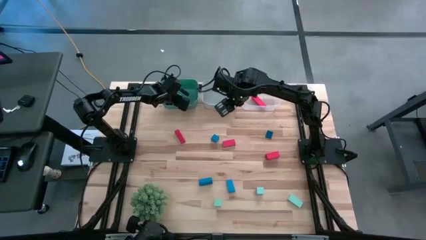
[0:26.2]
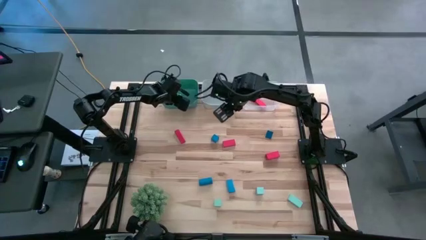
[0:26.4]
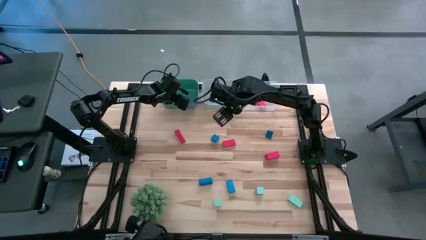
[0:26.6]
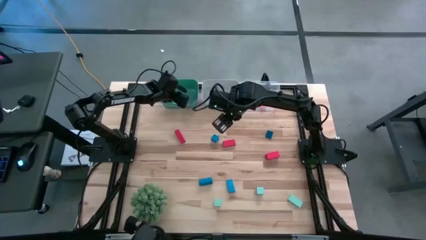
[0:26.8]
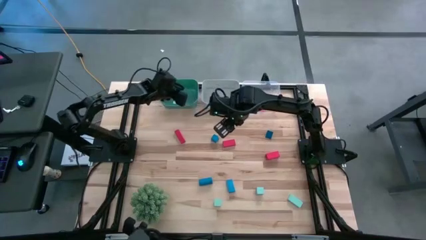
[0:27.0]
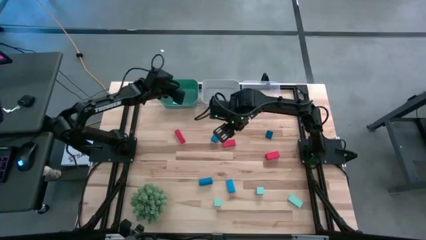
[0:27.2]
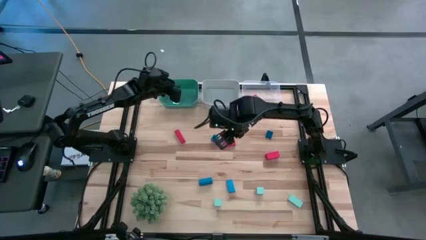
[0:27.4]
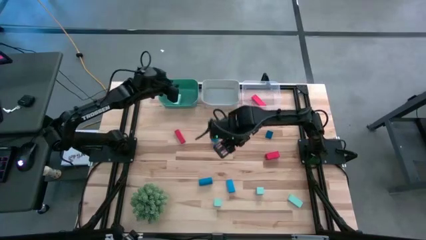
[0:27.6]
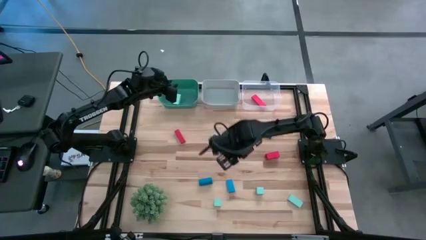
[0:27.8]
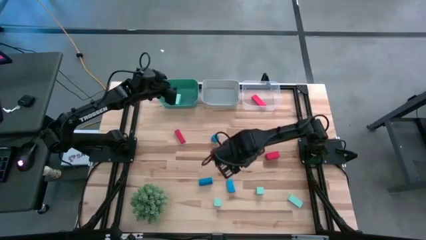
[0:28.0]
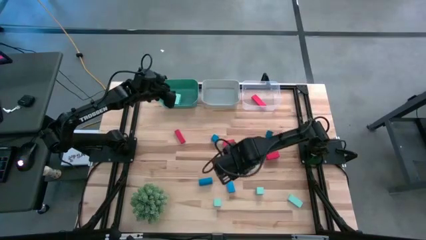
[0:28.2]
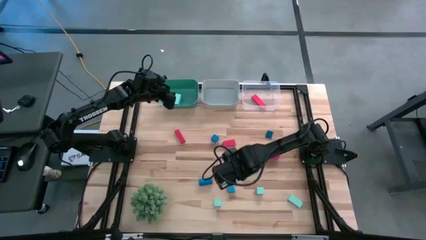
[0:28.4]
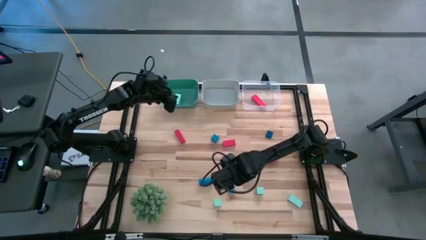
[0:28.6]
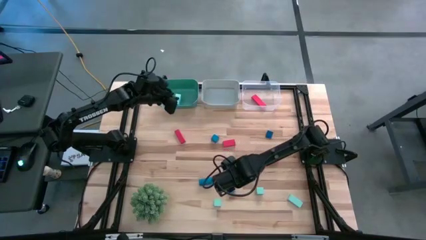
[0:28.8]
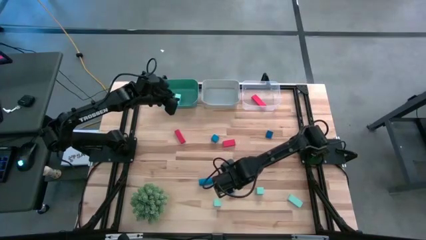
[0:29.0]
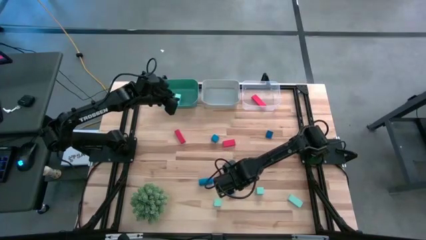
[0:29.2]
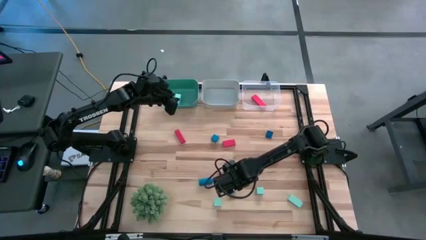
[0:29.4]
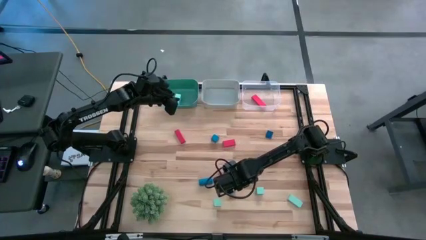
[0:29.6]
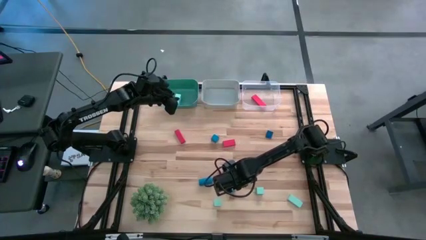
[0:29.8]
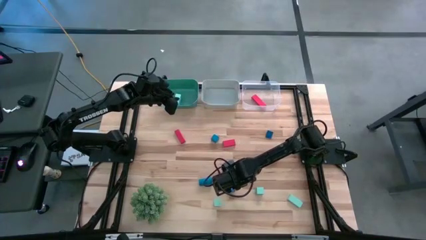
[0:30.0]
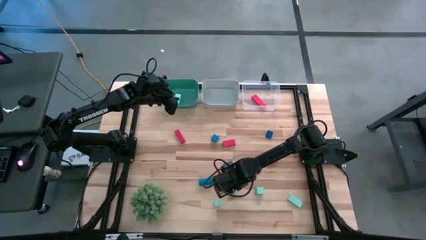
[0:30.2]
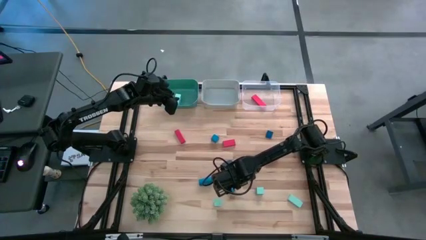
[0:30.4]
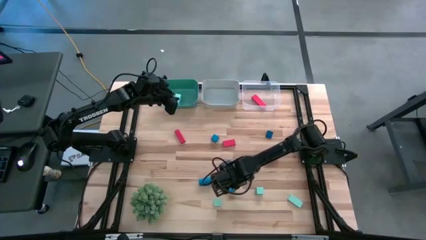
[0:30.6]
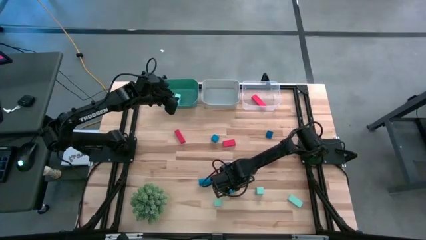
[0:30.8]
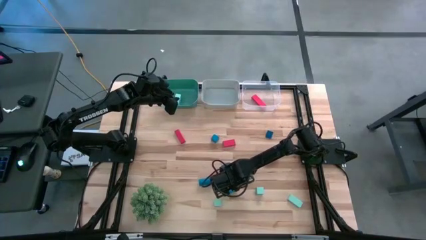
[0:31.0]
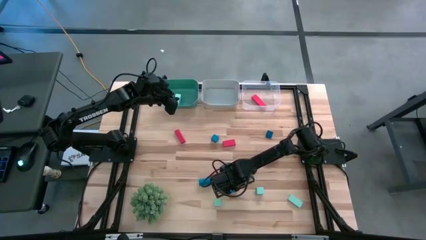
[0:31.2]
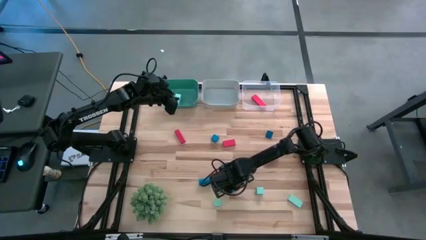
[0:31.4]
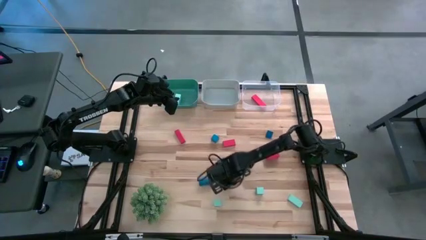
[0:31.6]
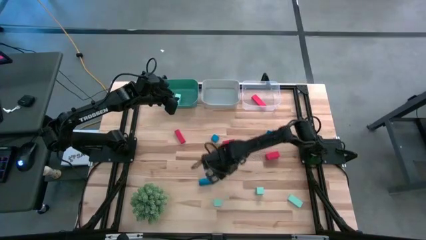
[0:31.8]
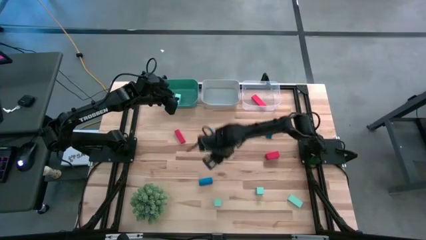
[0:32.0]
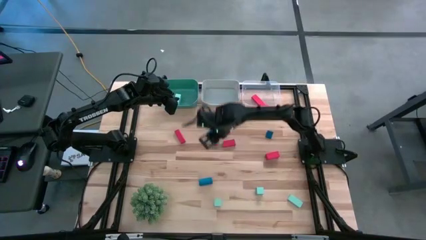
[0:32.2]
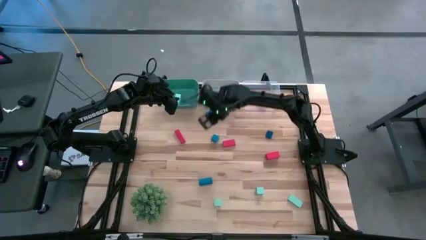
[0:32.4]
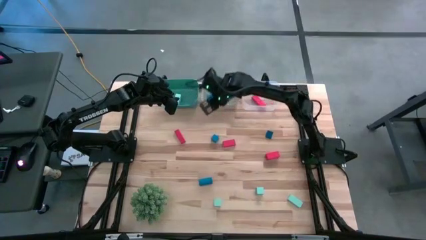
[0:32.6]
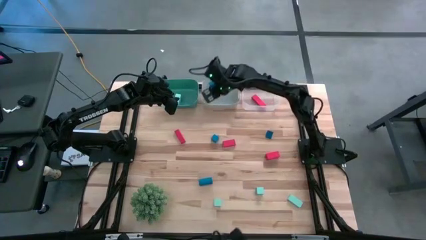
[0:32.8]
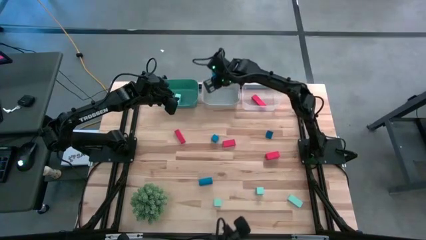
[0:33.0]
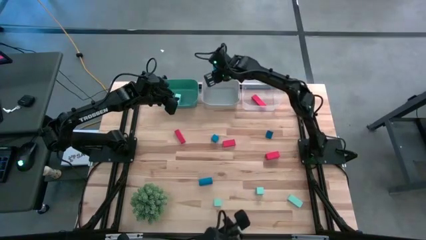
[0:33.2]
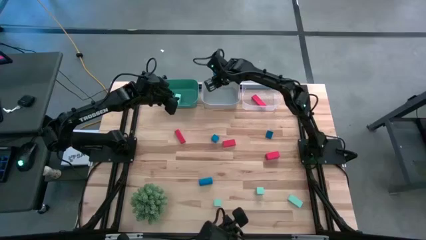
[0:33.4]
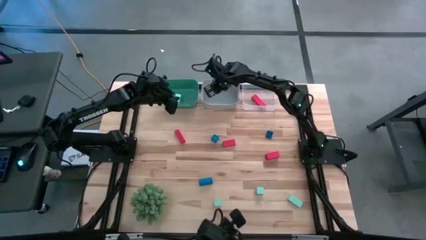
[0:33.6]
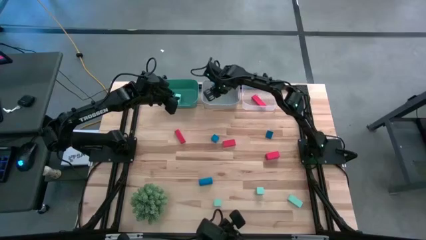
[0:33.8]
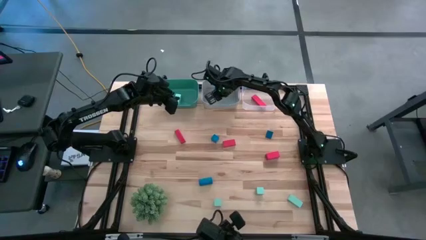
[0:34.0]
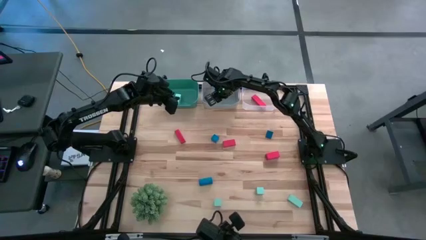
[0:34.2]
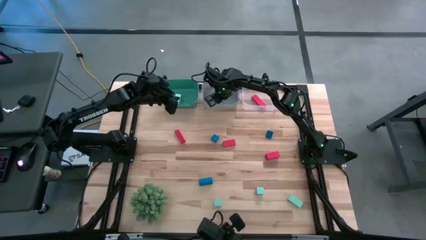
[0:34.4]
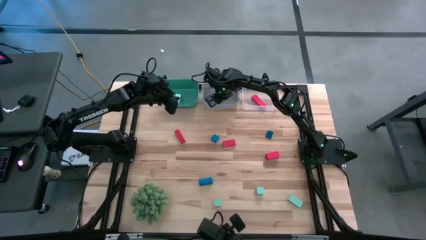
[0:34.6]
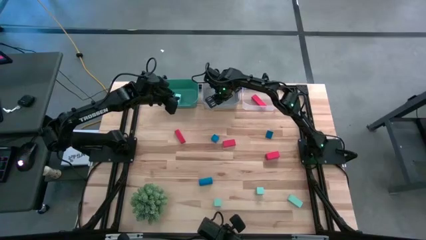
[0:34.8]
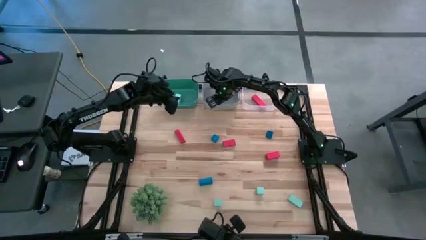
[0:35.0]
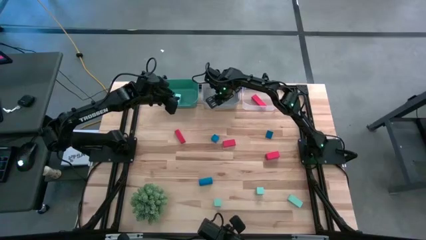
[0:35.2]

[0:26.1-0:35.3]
Task: Sort & place blocks by color
Put the blue block into the gray bin

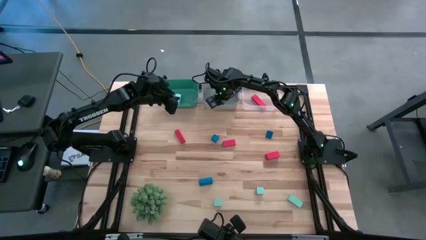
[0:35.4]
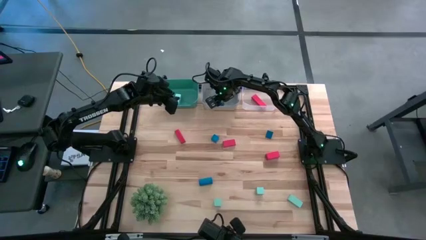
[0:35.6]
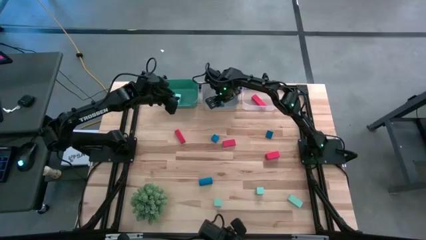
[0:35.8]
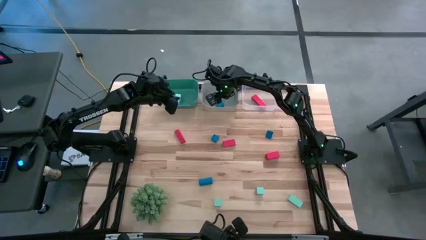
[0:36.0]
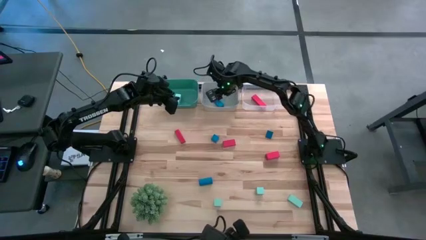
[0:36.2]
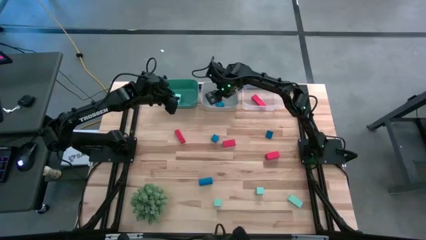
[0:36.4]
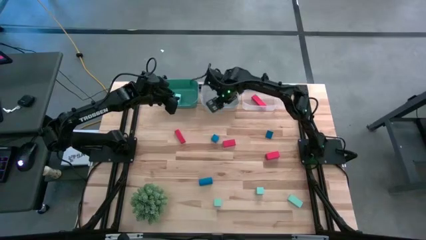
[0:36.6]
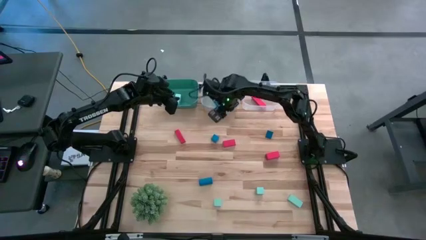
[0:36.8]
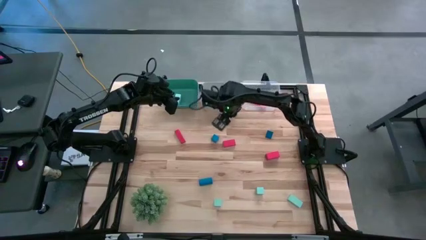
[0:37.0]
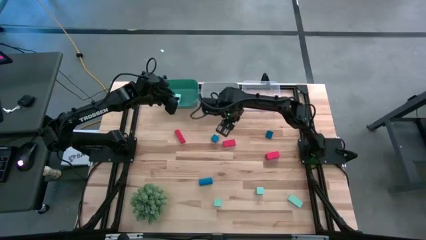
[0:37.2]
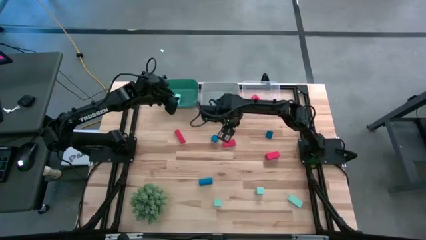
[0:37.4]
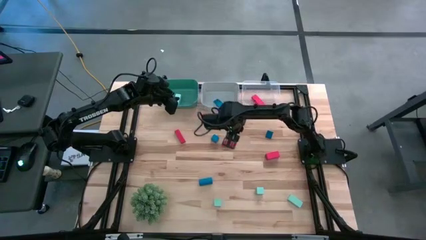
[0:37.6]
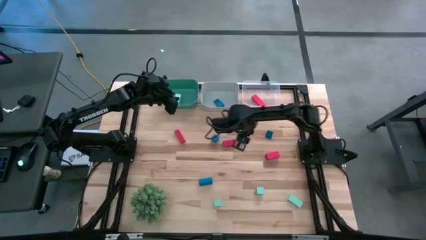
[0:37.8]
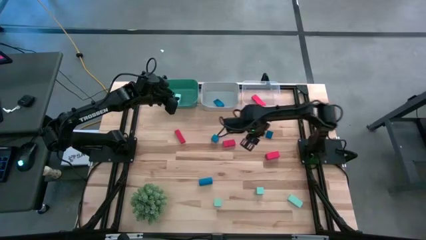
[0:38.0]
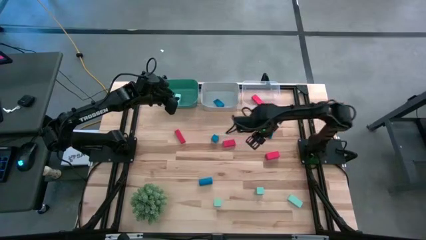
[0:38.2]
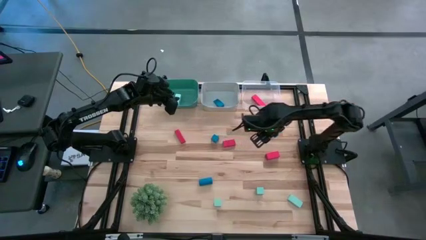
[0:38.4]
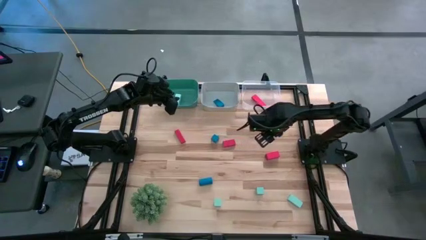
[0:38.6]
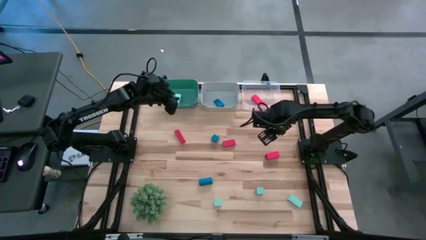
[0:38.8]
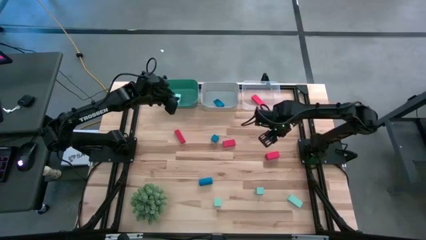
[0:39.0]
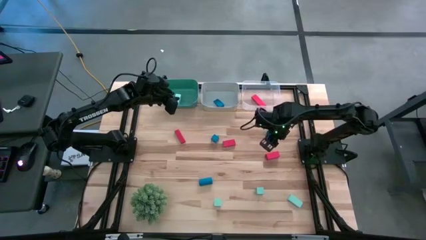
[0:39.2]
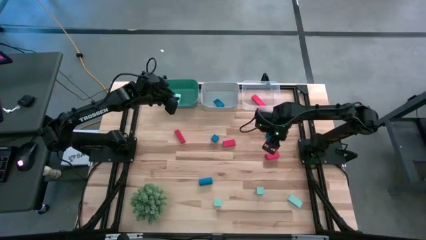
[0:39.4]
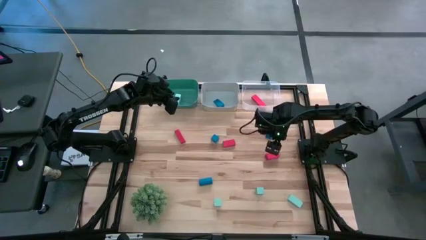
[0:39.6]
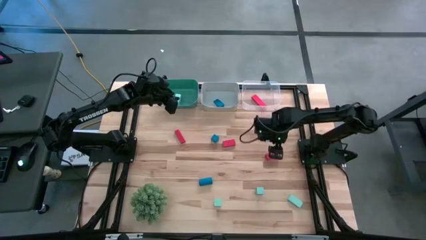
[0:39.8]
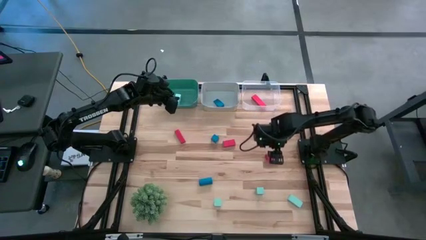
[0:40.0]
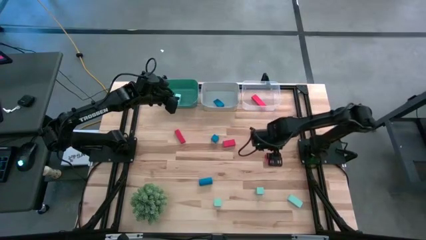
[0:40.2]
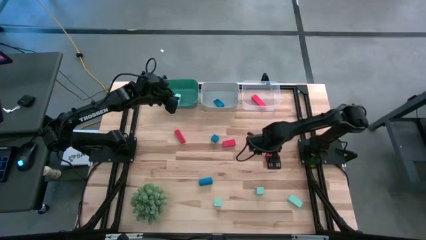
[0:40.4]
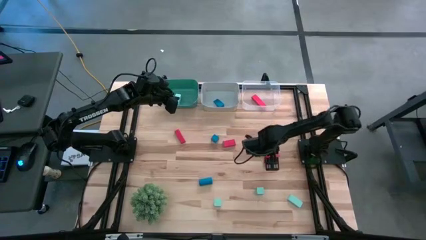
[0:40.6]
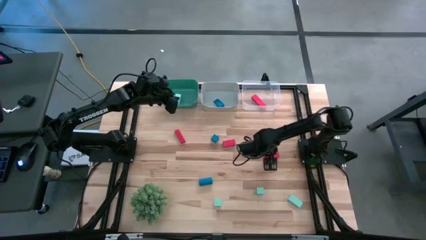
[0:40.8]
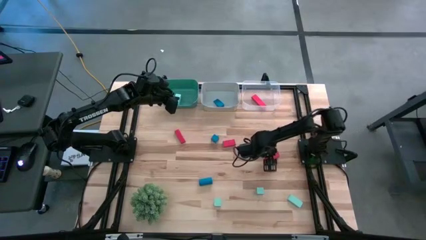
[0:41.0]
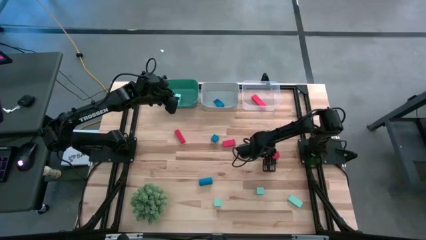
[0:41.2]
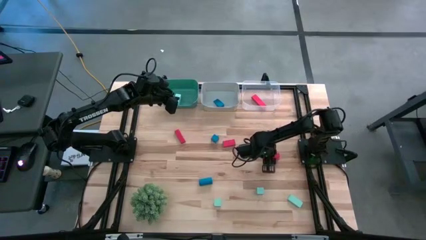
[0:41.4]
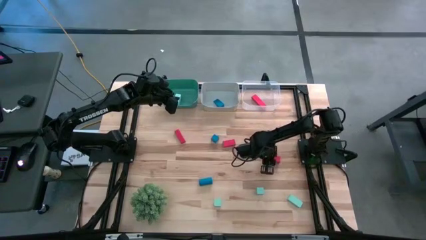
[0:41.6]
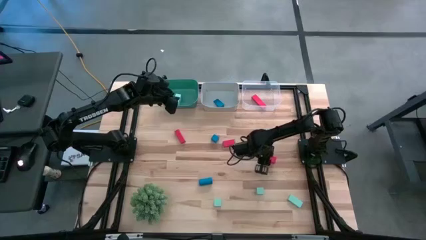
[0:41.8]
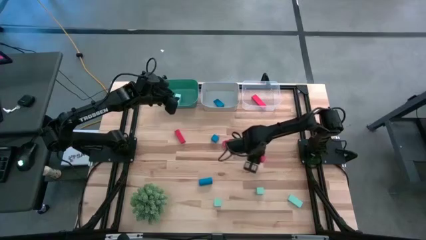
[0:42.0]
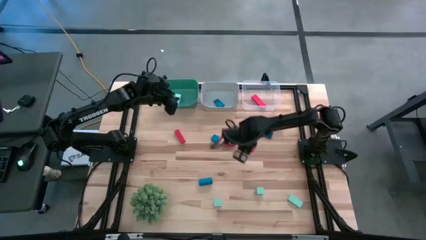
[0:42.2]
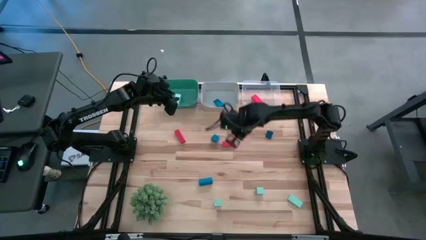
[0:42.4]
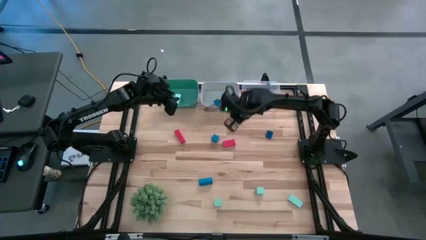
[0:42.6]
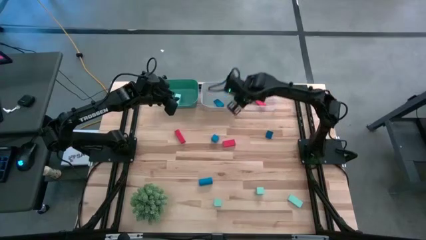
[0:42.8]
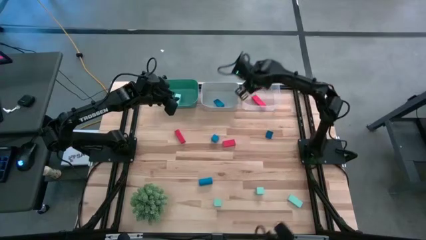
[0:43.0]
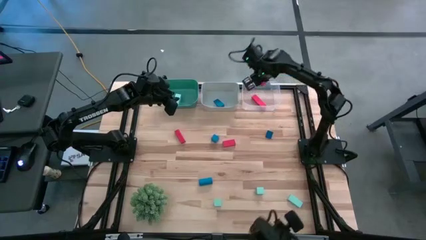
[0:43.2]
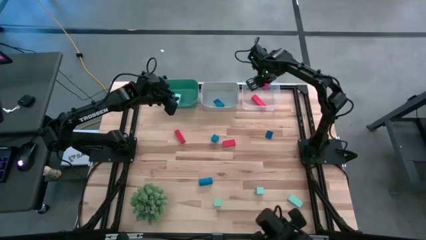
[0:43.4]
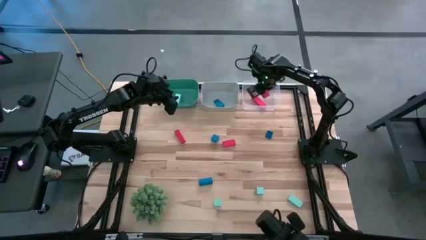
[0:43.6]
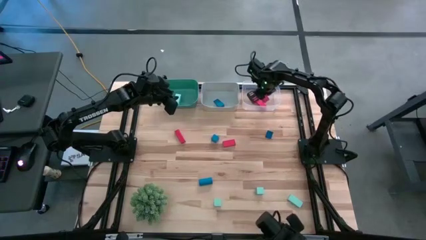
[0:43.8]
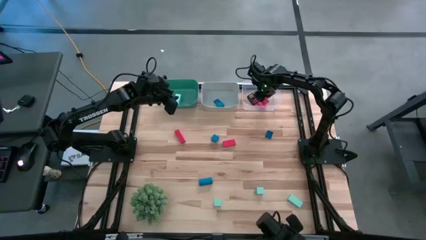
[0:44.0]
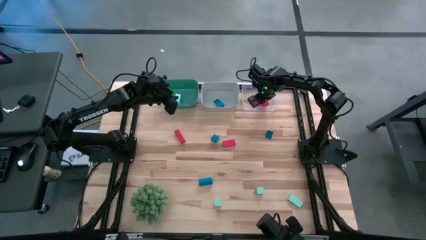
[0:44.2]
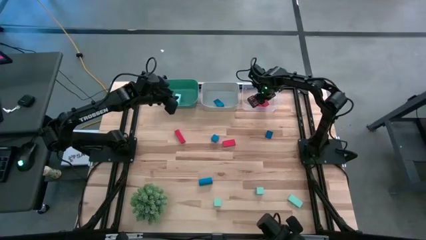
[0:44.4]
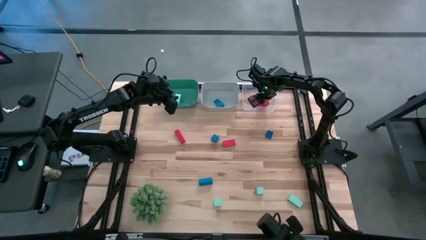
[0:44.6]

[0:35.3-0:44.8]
Put the orange block into the transparent bin
